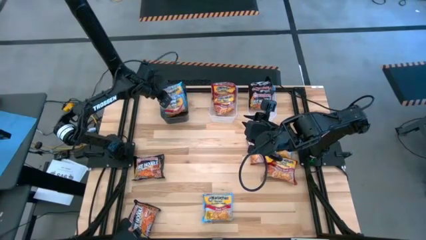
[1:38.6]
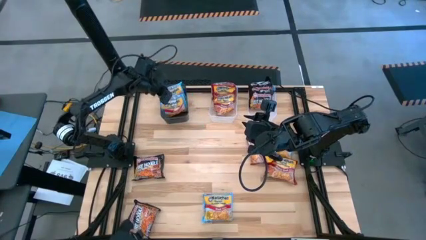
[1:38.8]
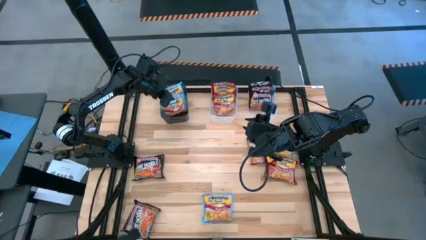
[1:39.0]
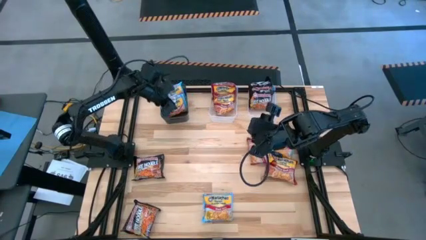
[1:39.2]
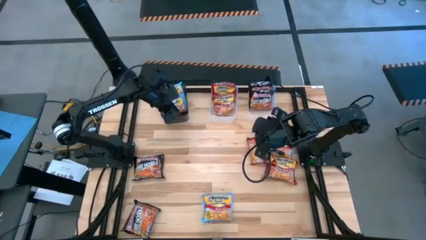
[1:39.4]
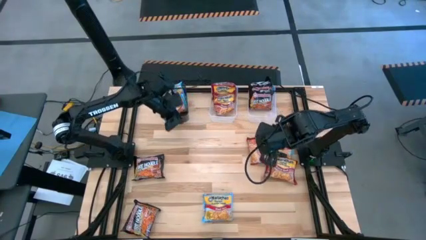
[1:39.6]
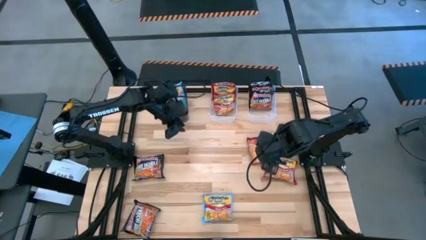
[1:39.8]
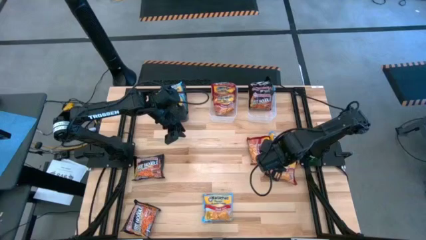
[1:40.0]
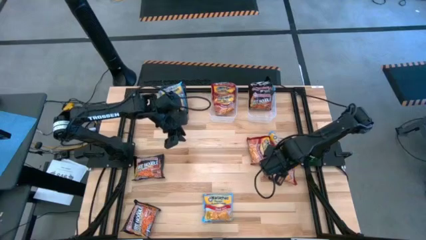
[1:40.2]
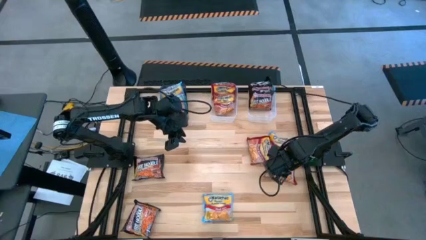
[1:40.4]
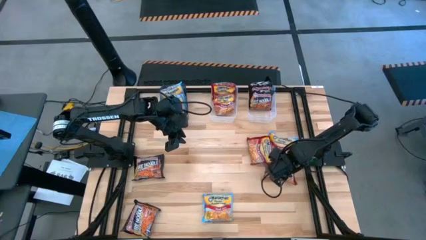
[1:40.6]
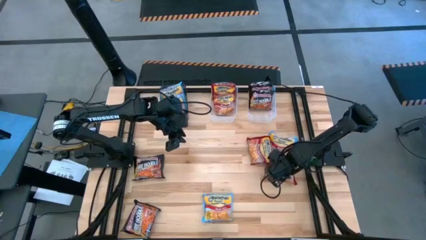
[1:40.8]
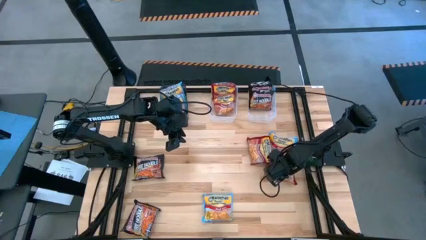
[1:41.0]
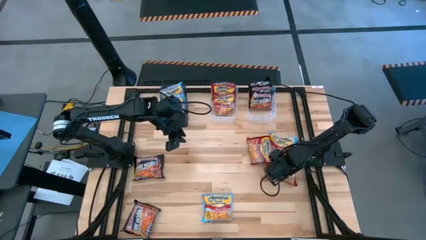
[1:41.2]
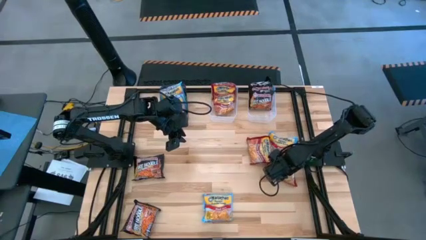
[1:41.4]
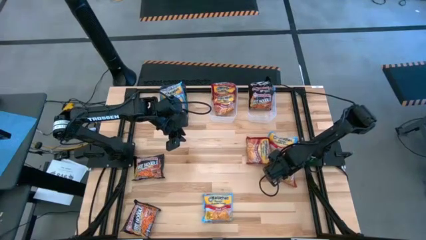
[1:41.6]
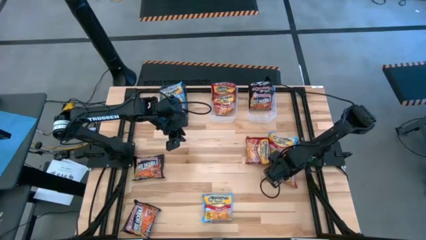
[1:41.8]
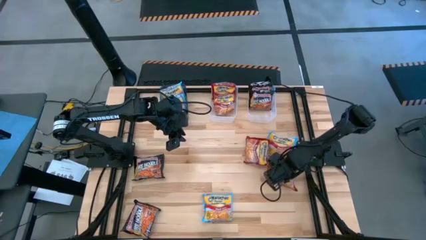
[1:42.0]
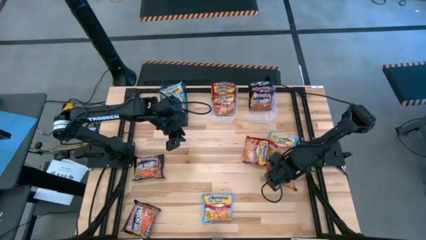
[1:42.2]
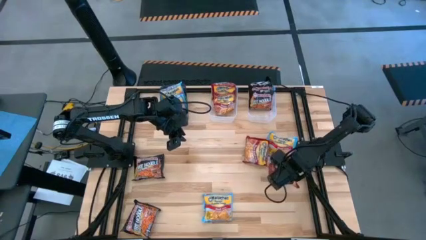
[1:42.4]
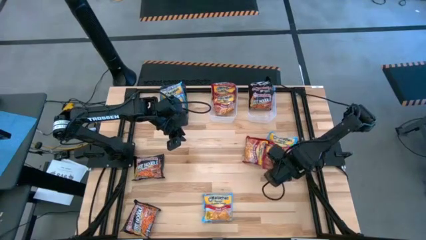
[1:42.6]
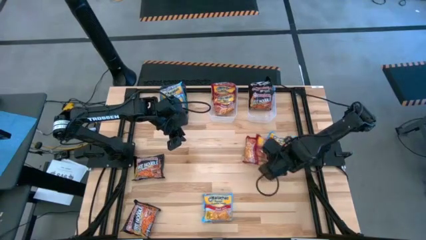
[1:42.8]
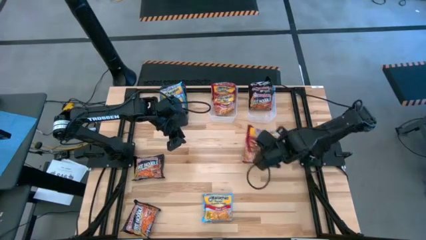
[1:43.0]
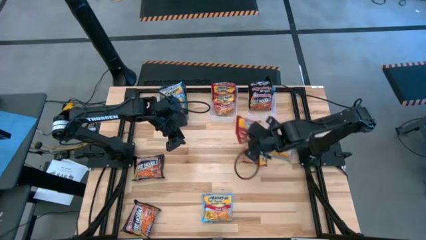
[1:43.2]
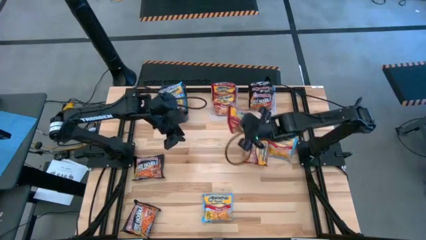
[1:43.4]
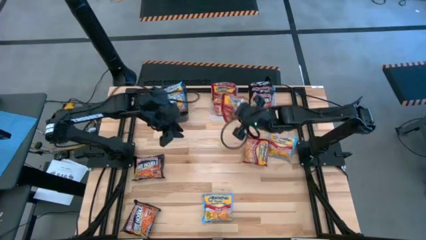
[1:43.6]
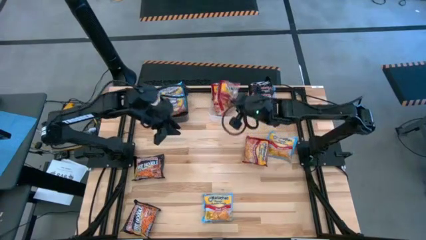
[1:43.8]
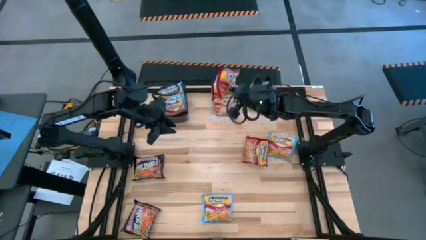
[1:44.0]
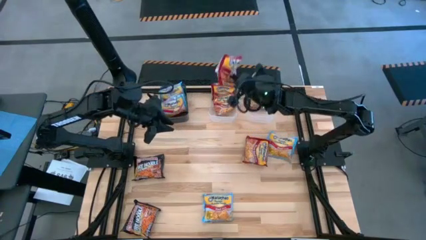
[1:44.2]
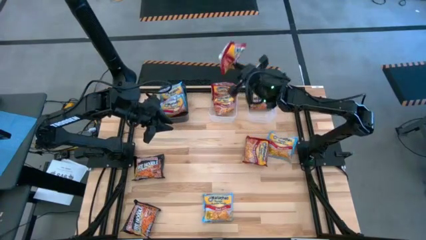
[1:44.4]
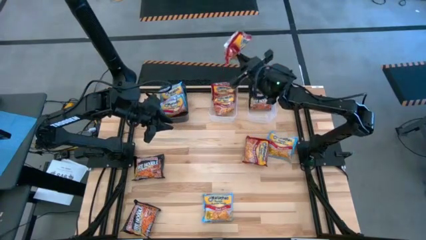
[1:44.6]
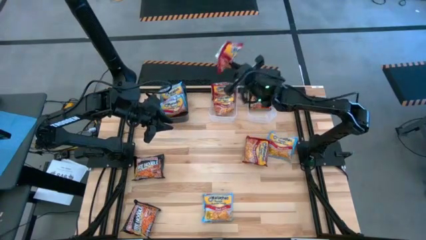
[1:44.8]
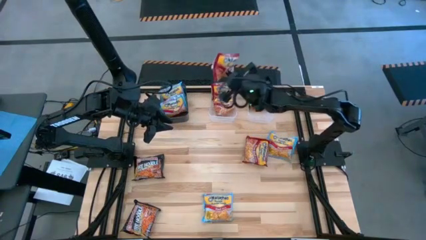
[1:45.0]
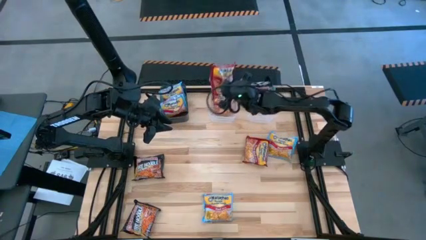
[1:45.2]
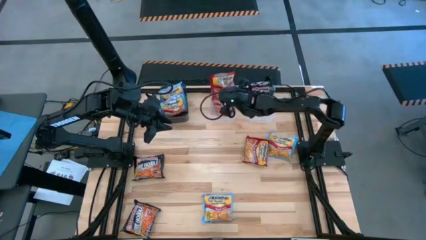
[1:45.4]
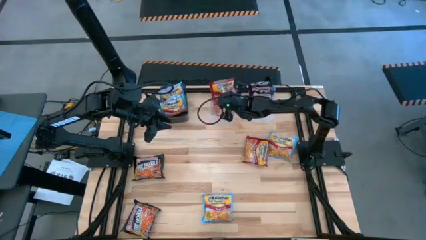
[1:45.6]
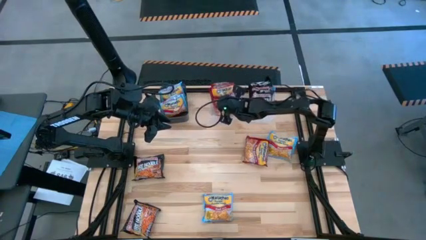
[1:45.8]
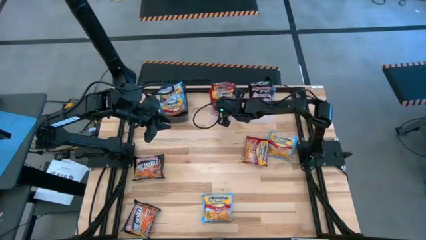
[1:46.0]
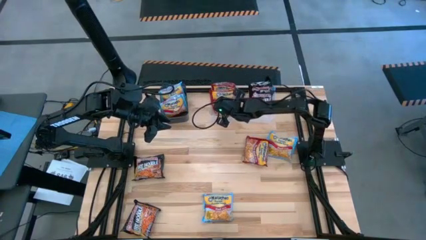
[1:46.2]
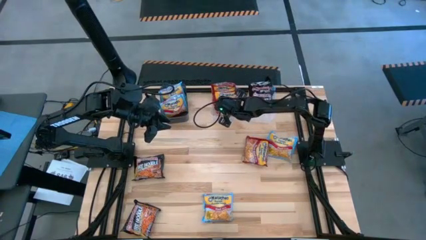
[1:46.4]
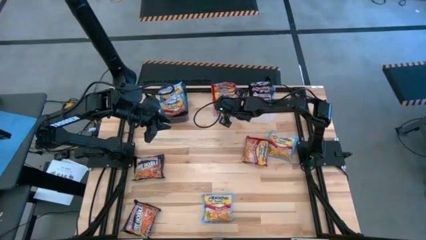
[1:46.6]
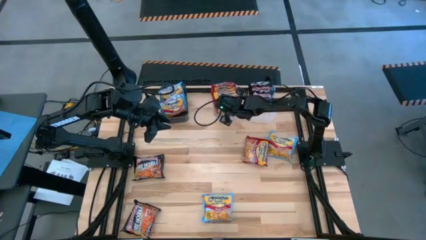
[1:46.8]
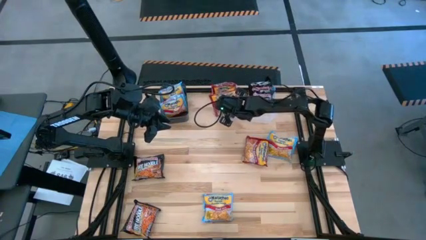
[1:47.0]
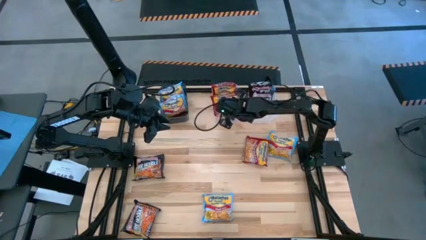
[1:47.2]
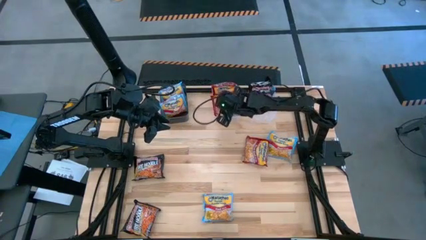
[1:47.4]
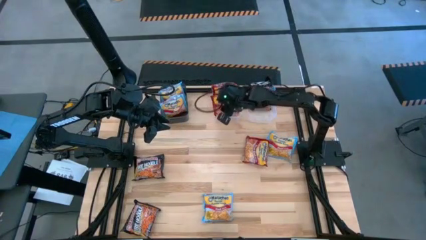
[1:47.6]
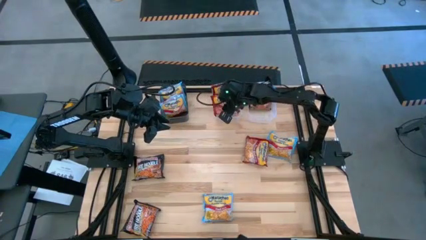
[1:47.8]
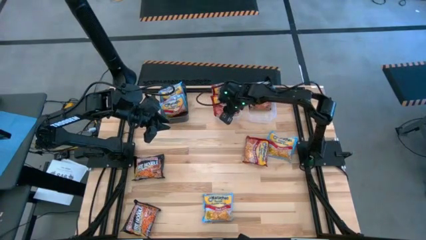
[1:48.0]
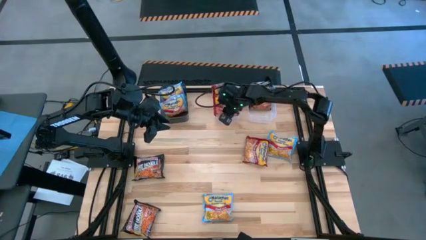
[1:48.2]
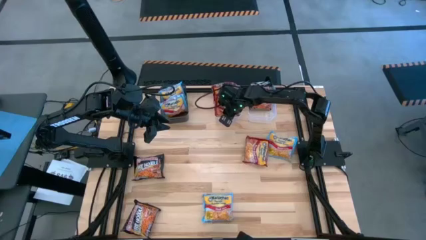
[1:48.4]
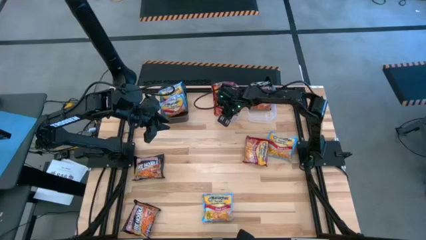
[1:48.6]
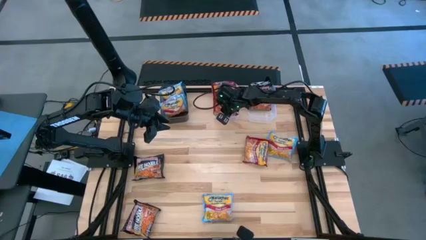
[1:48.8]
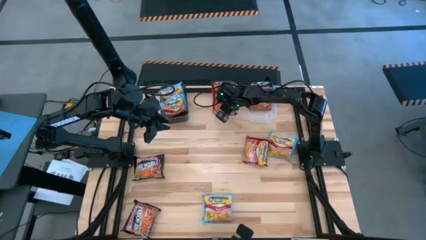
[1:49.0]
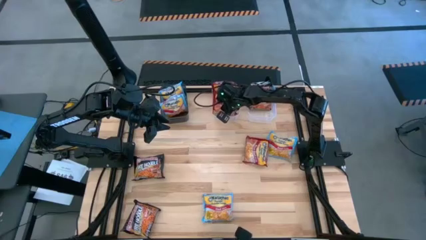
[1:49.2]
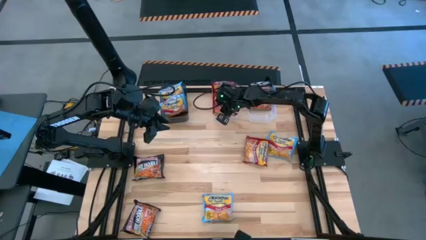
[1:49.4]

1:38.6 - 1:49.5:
Task: Sort Maruchan noodles
Put the red noodle pack into the left transparent bin

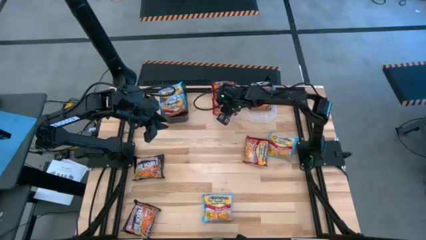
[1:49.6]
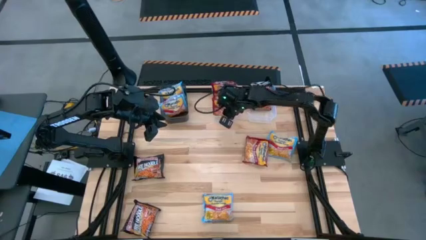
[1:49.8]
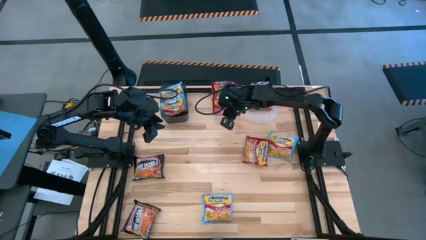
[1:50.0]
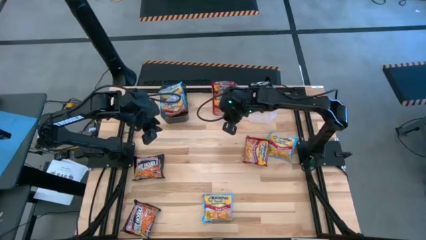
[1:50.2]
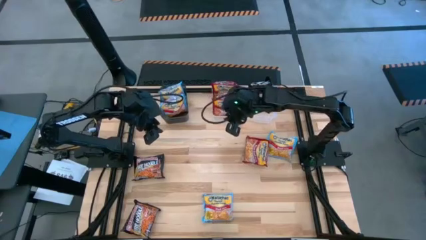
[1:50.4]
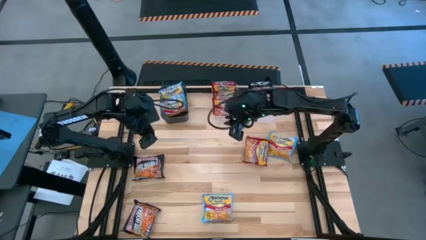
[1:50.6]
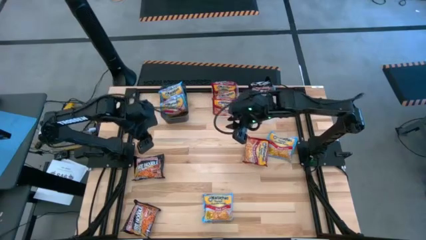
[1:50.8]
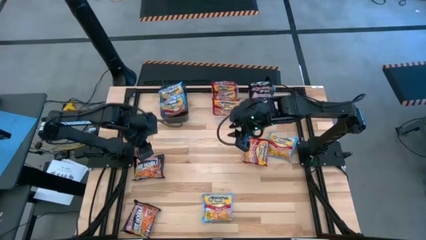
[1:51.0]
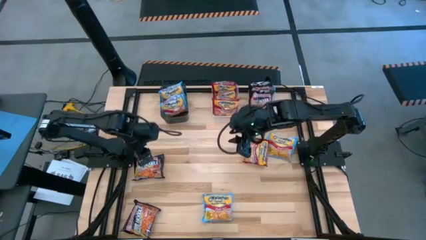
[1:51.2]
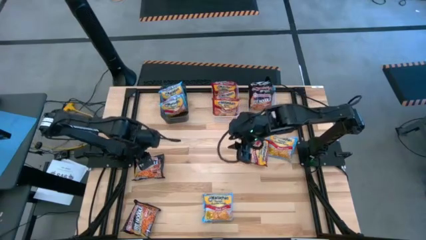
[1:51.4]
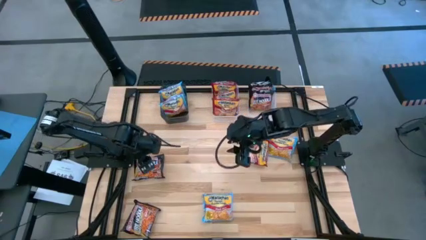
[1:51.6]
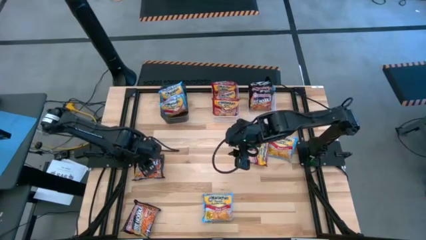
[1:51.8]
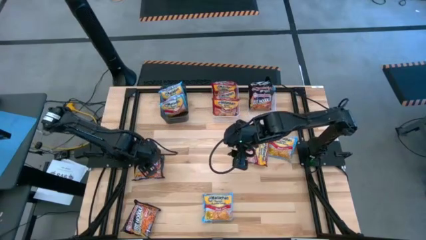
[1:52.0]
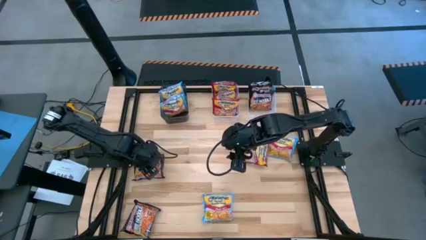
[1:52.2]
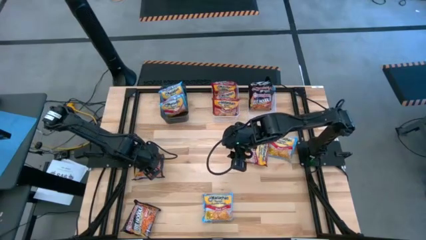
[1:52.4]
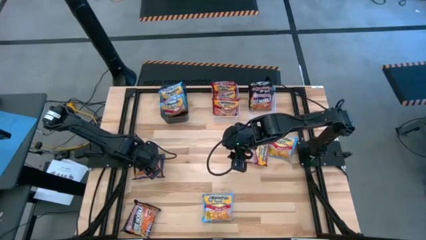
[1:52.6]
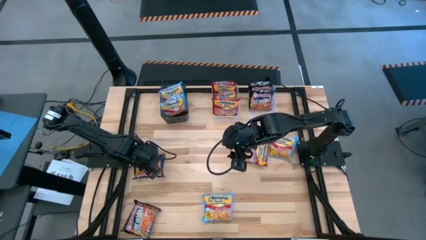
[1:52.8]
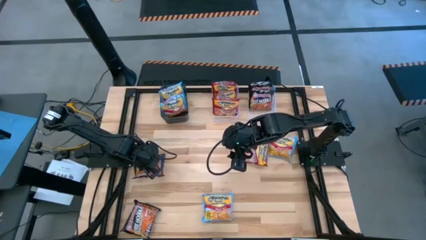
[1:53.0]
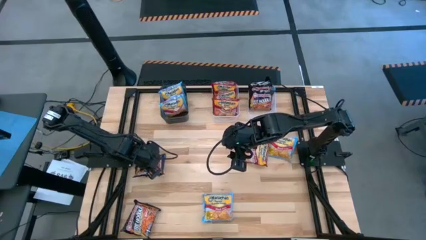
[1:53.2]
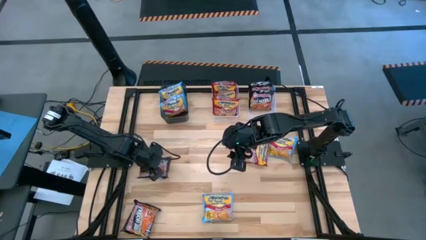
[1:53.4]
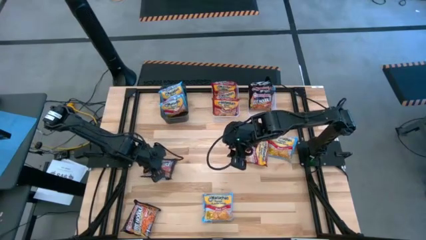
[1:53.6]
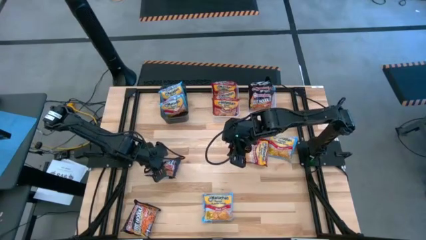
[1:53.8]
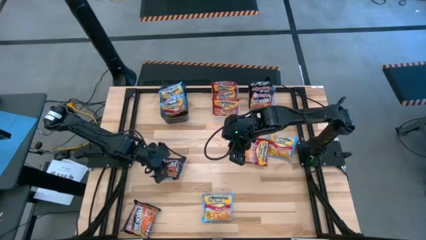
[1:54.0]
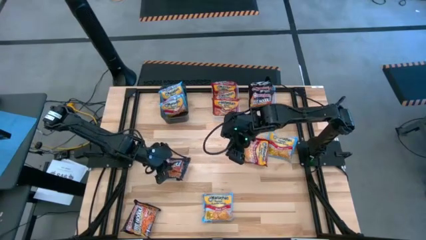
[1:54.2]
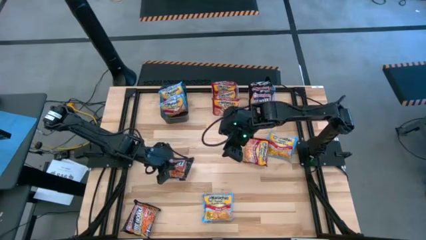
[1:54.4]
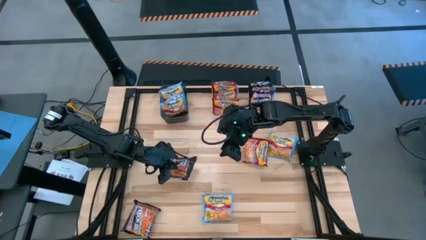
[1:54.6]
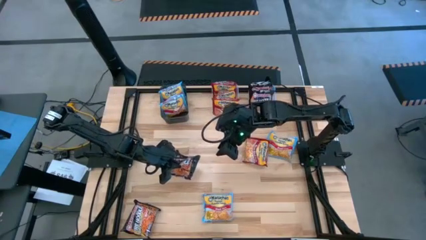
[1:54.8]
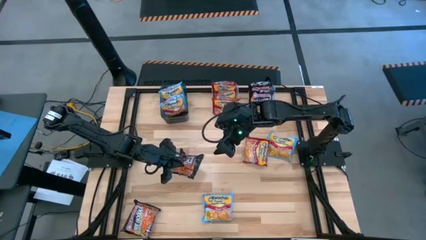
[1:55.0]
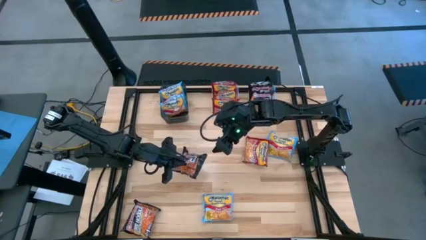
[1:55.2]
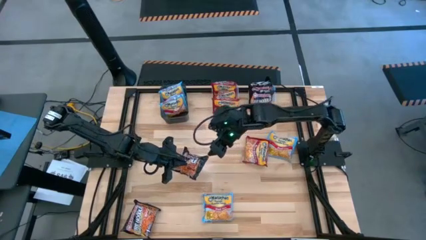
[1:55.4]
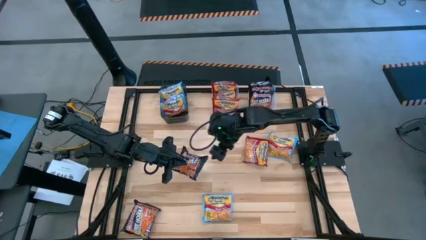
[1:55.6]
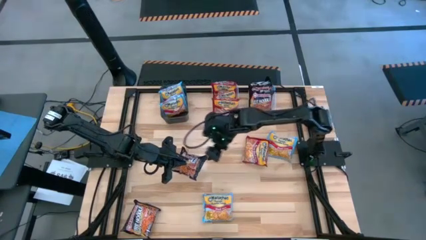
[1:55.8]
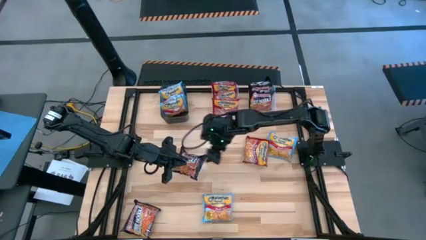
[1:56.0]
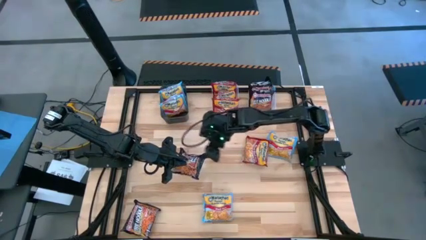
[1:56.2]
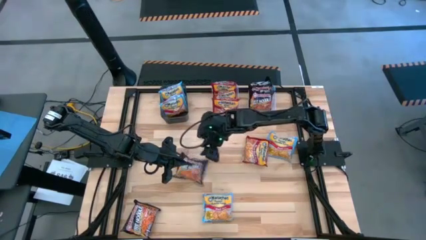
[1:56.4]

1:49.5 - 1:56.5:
Put the black noodle pack into the right transparent bin
